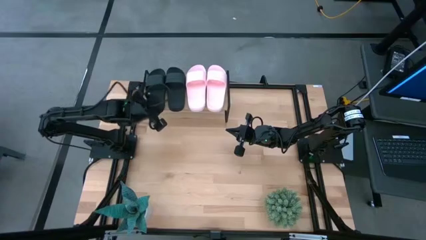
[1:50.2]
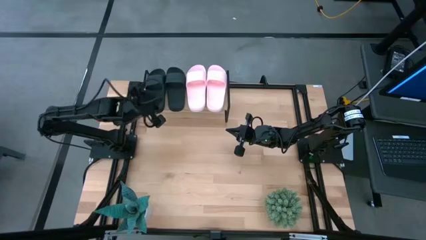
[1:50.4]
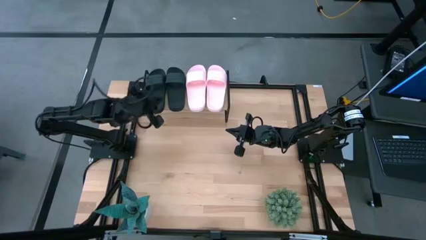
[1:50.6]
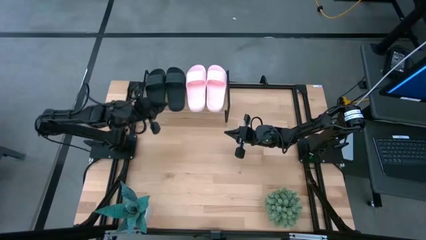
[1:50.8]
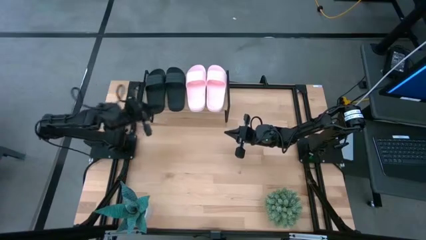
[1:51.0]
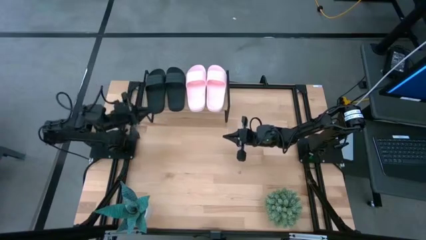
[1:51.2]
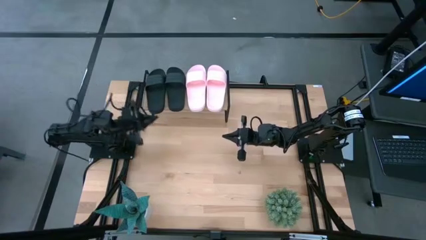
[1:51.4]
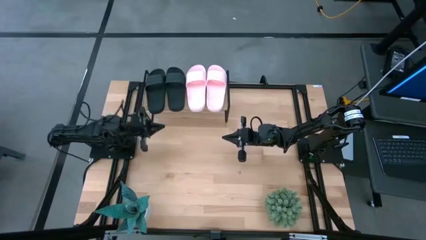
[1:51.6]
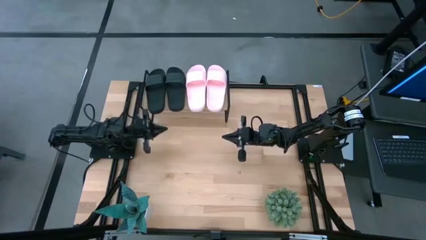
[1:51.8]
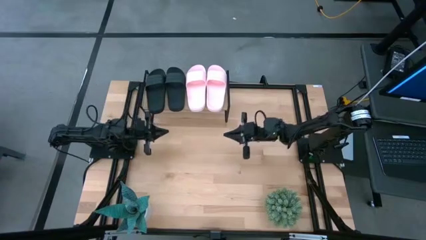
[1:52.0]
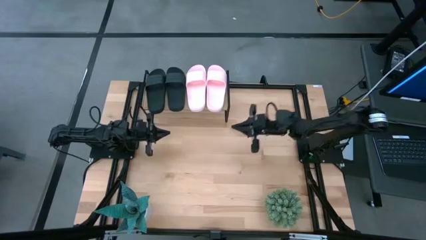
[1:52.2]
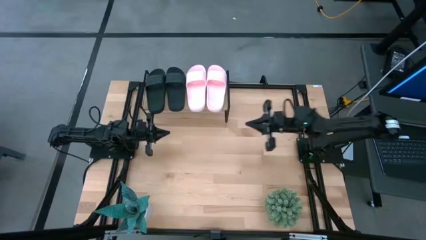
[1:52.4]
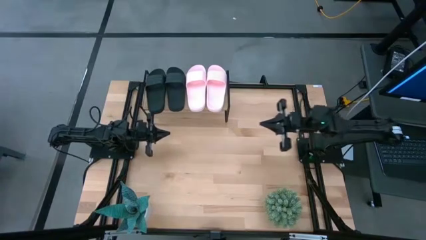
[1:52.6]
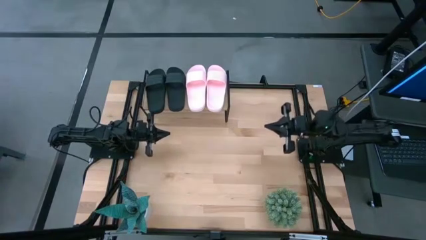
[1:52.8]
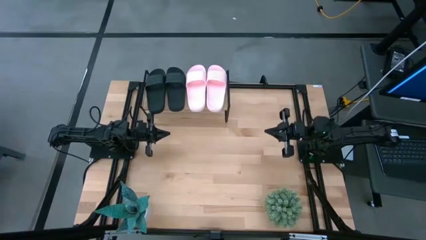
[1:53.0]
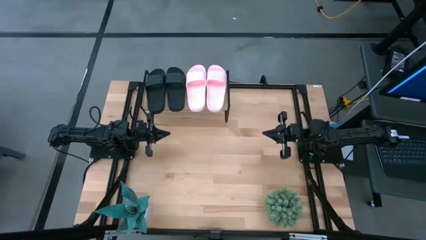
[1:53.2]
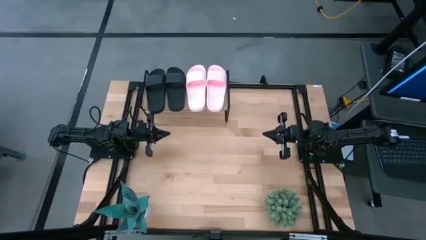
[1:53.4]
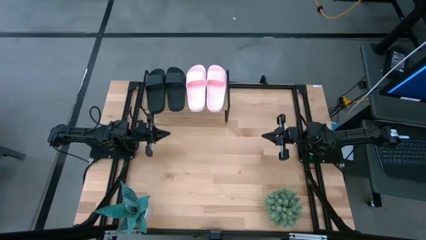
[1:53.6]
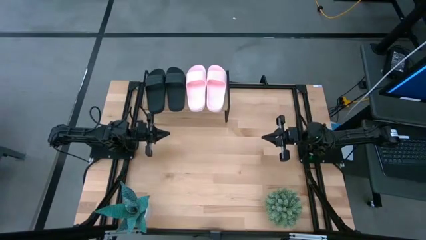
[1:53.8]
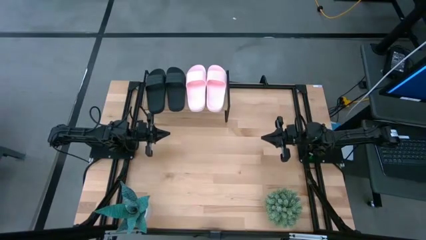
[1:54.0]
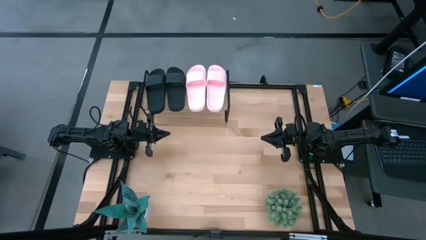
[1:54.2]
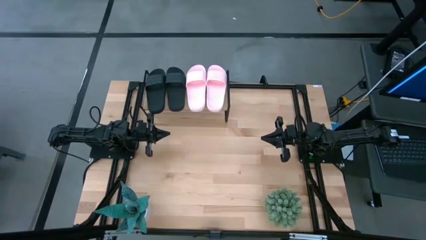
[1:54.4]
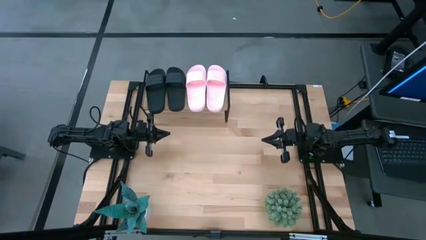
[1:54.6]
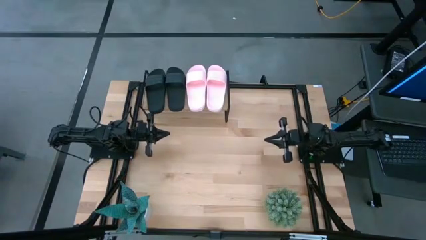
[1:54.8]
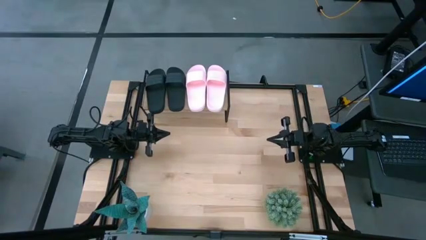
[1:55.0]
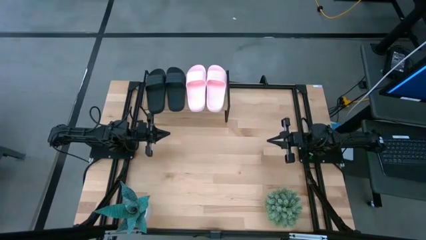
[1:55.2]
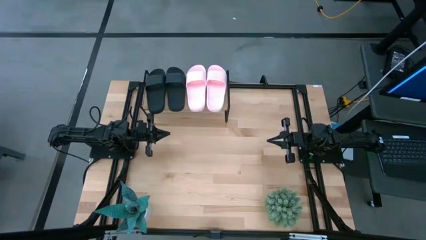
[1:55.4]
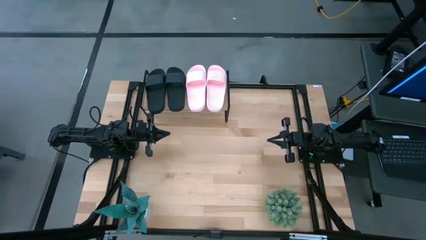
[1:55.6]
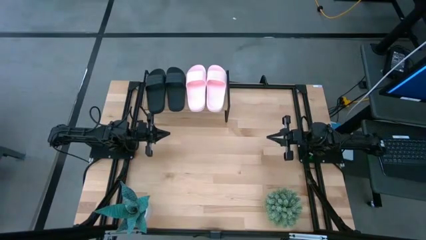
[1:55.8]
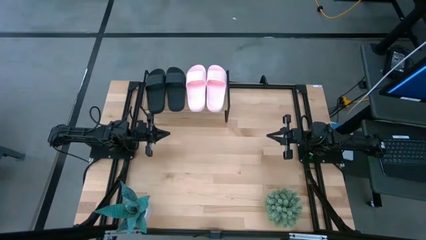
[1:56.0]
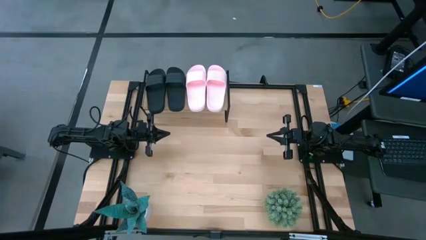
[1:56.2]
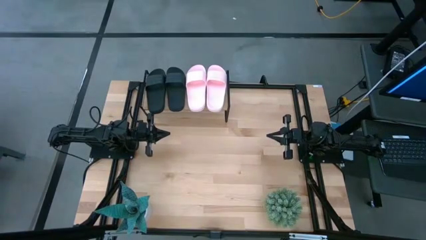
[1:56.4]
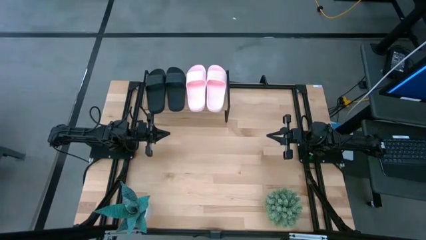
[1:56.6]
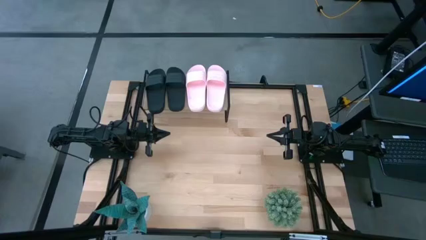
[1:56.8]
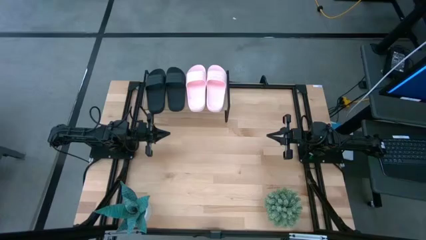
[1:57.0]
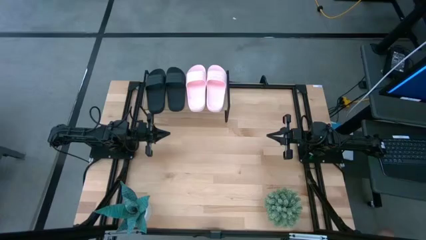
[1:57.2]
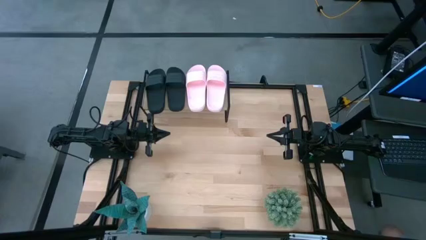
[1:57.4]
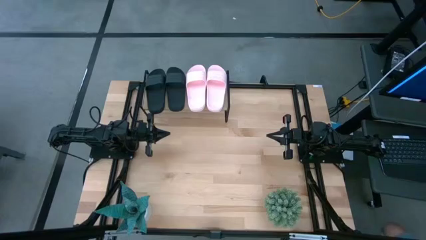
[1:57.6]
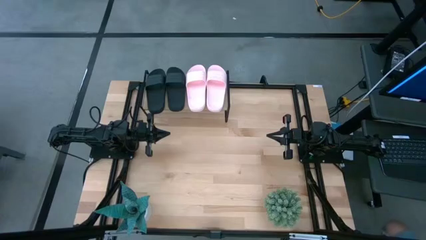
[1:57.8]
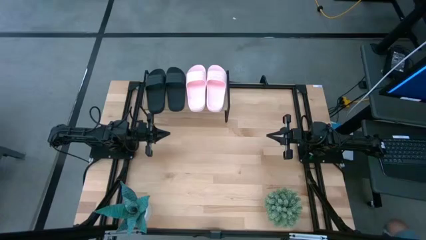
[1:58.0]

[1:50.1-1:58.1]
Task: Pick and place slides into the shelf
Return to Home Position

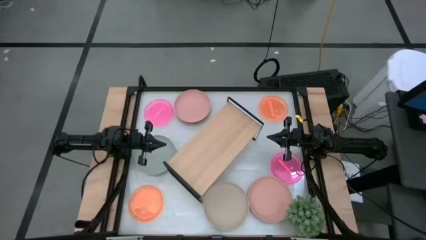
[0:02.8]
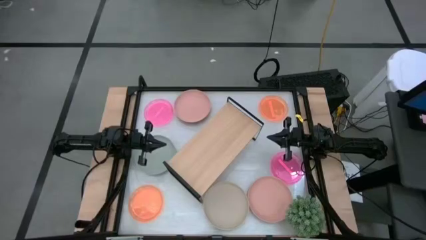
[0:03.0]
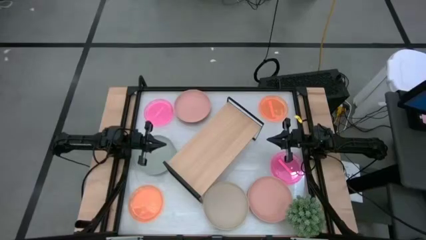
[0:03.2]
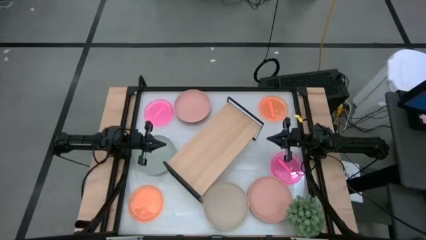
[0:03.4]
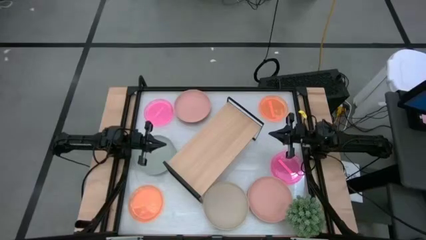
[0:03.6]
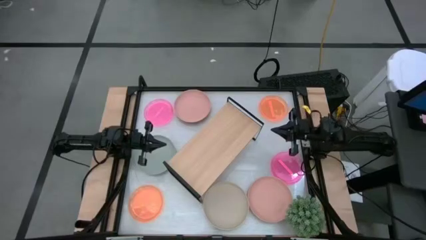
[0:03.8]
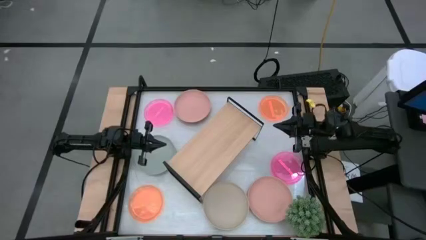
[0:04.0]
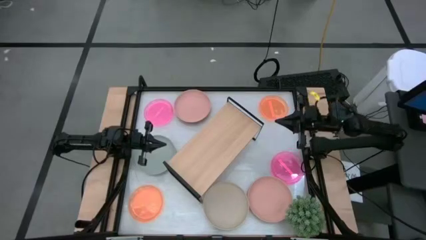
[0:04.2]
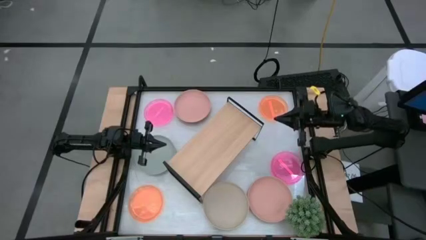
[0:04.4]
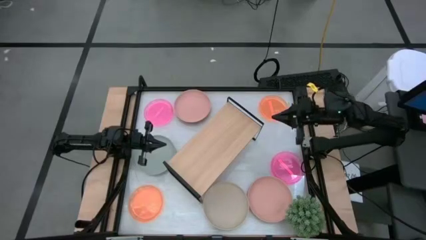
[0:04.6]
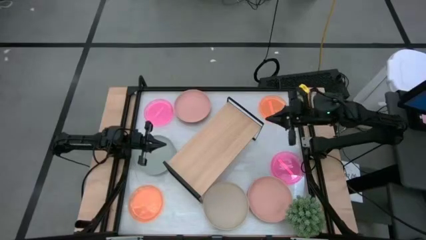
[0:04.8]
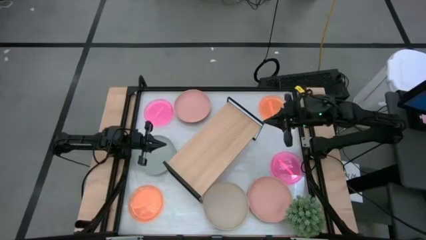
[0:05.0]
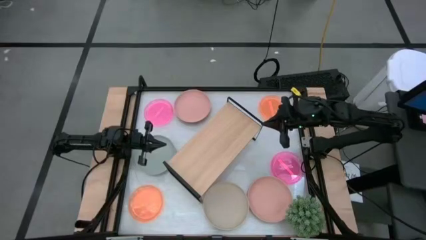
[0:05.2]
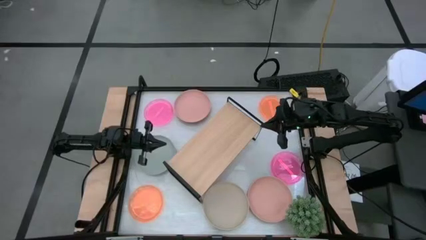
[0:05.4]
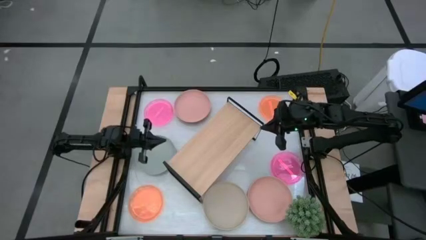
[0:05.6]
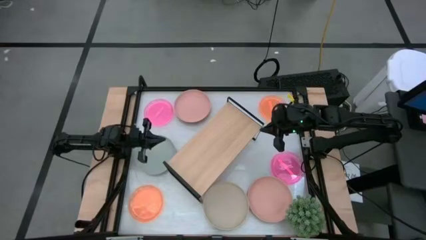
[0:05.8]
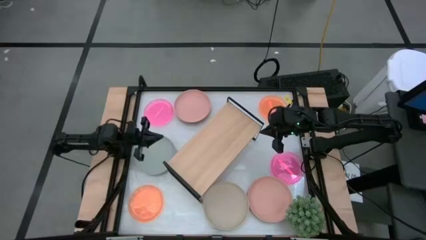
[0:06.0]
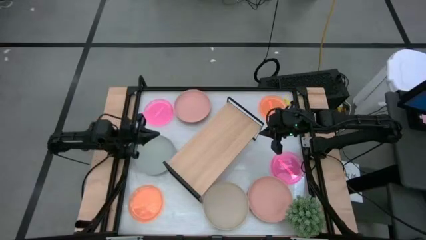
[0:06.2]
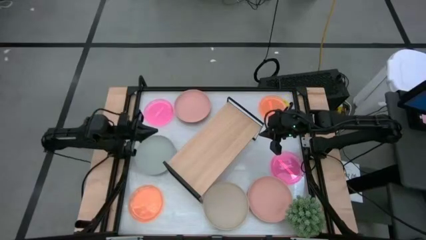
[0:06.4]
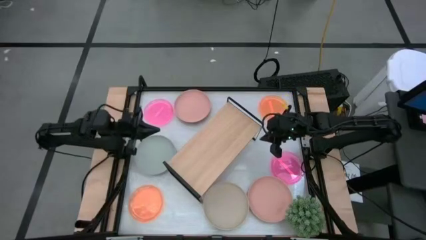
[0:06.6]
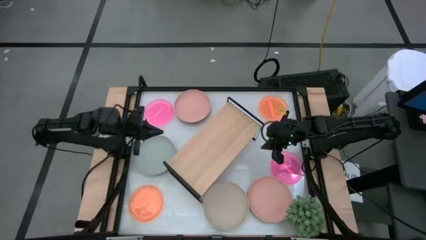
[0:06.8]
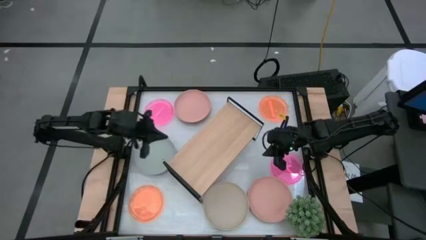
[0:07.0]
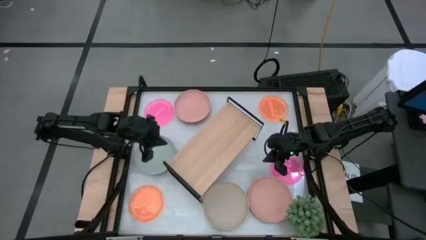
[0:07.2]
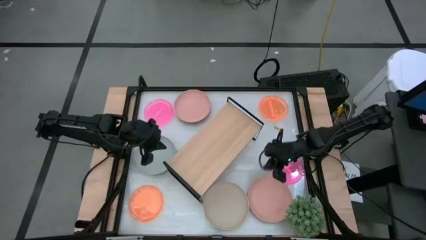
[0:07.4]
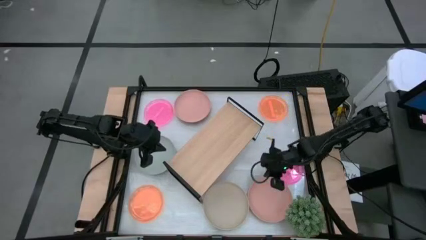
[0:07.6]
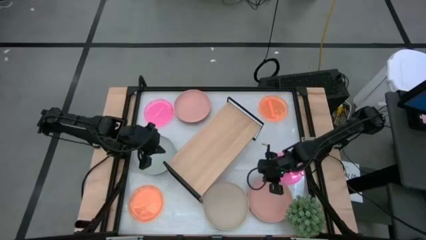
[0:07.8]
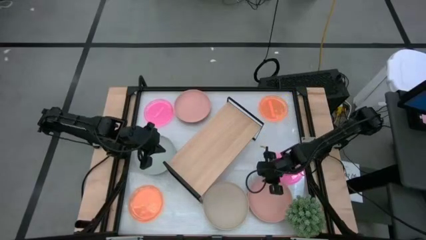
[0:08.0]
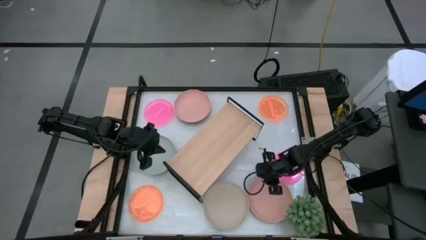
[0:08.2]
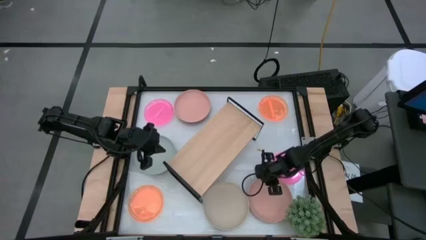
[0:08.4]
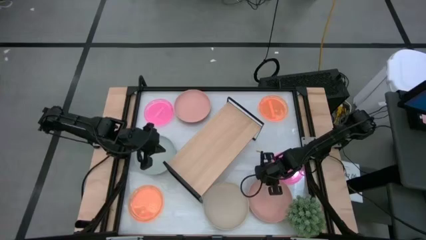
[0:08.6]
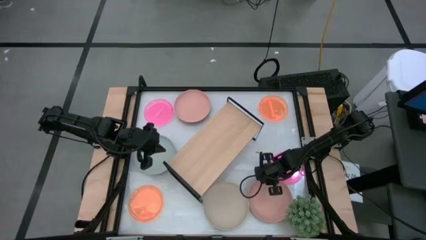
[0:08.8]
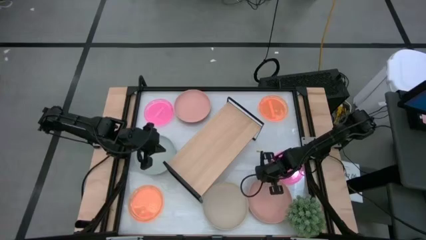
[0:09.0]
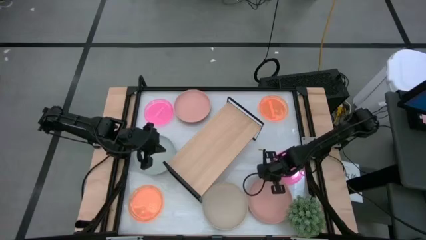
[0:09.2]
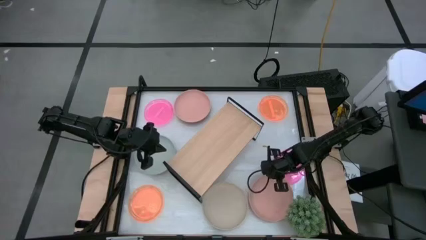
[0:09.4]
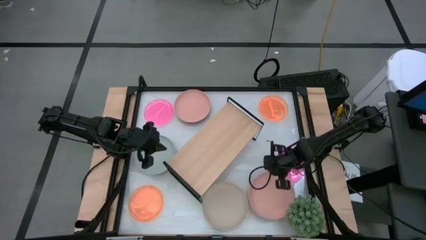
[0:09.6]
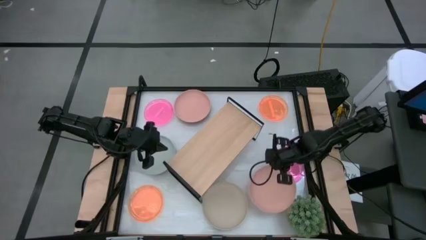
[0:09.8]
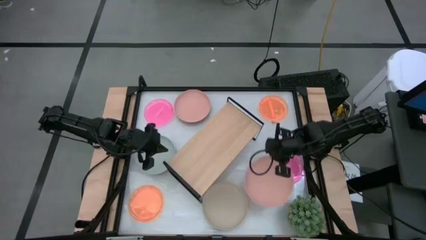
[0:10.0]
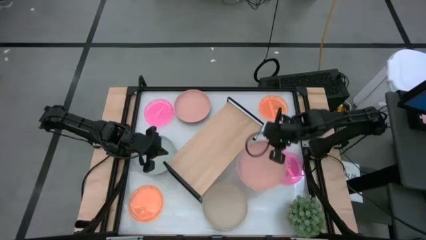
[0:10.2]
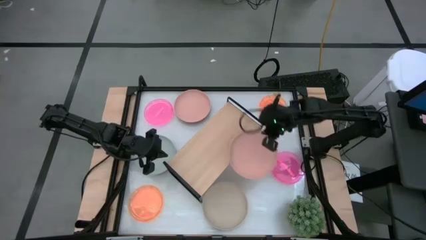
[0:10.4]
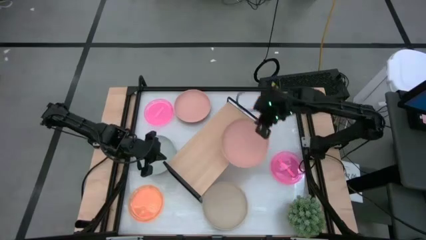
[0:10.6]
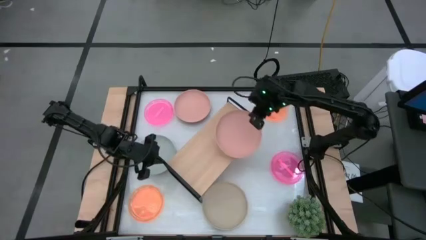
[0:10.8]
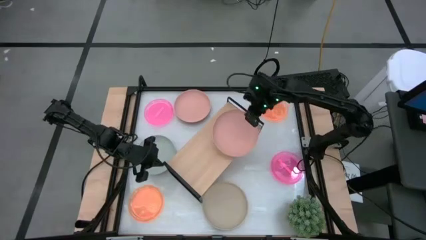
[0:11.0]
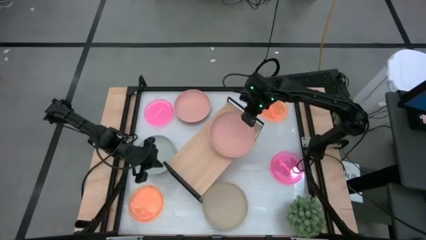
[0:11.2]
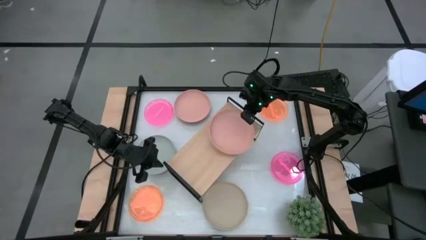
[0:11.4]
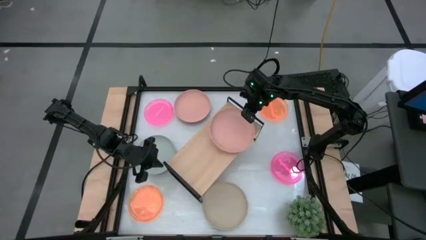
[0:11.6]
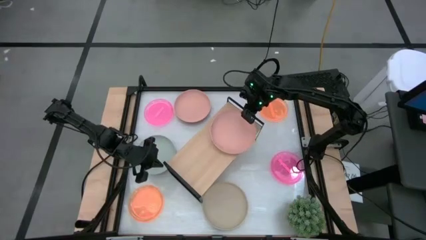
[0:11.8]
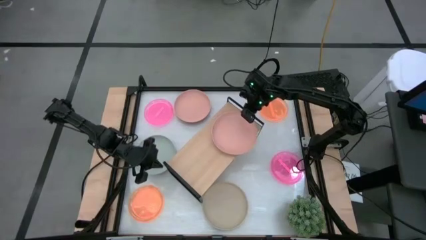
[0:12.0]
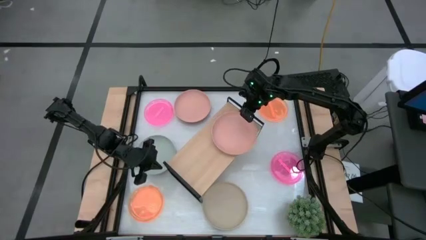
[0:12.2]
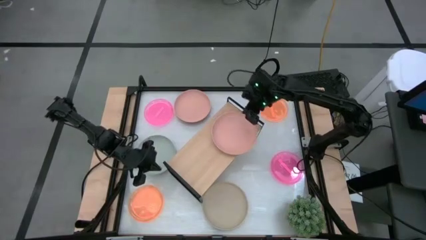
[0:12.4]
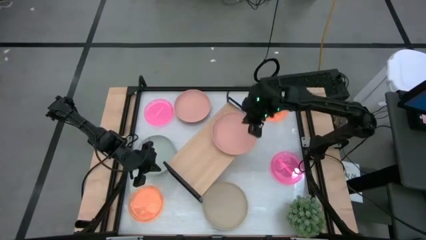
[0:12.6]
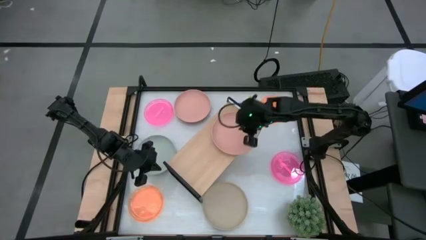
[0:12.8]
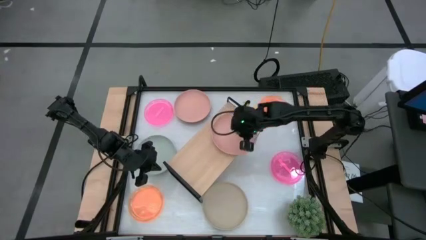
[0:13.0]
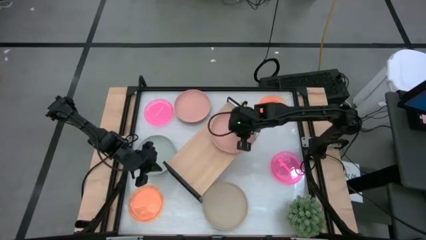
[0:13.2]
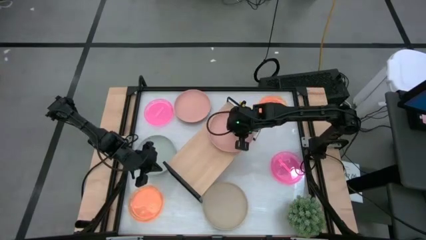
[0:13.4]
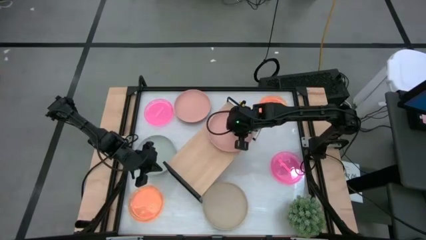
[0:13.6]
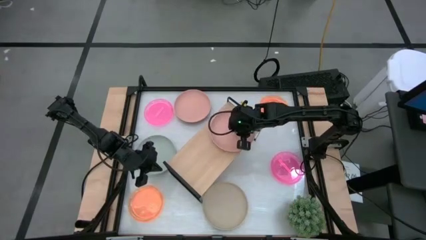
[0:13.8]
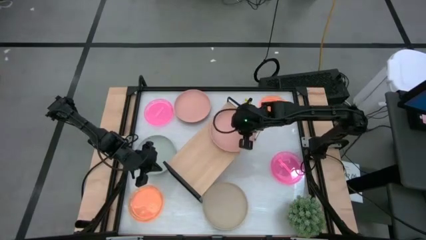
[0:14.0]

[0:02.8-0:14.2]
Task: Place and stack plates onto a shelf
Put the bottom big light pink plate on the shelf
